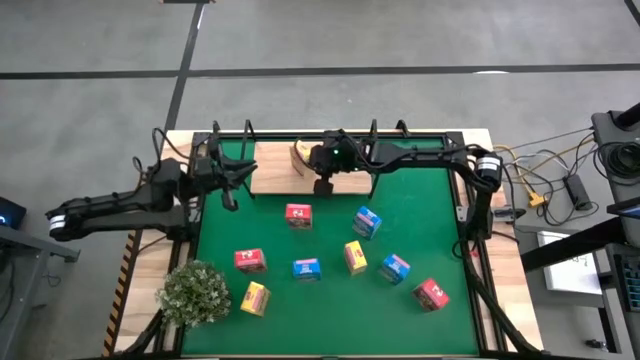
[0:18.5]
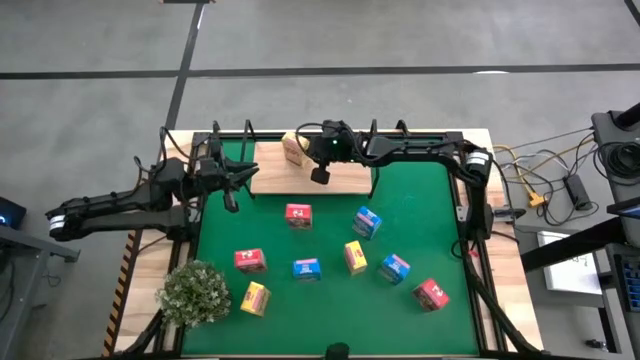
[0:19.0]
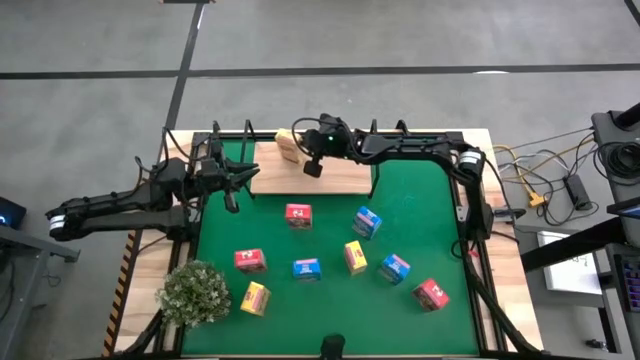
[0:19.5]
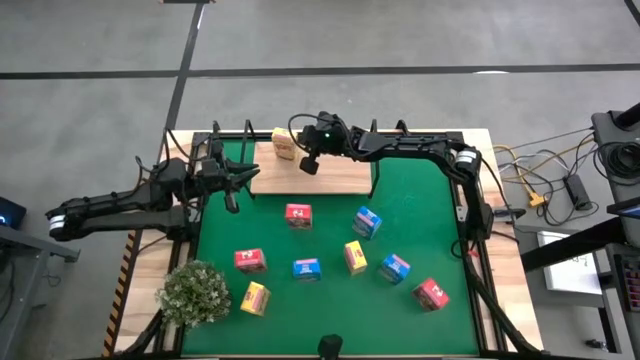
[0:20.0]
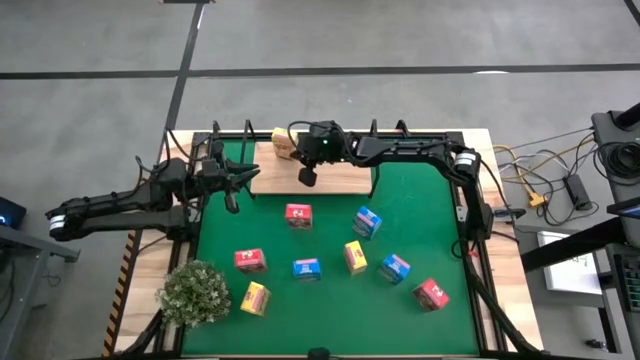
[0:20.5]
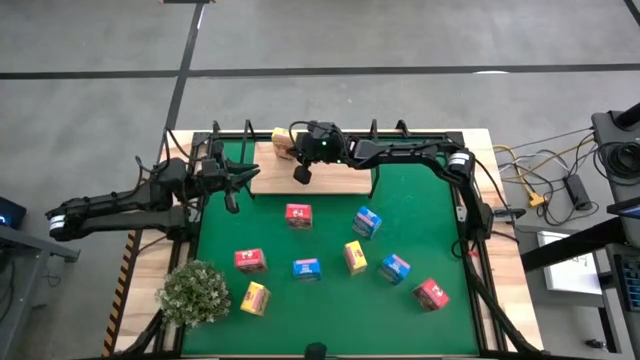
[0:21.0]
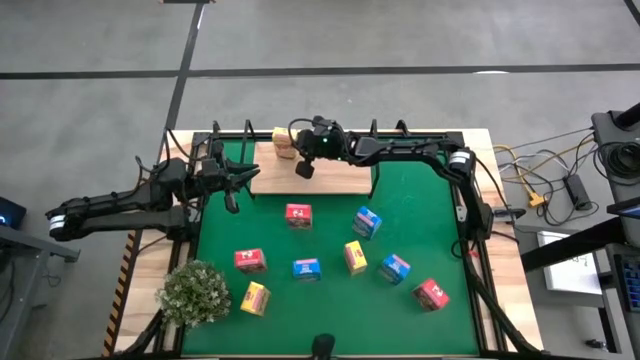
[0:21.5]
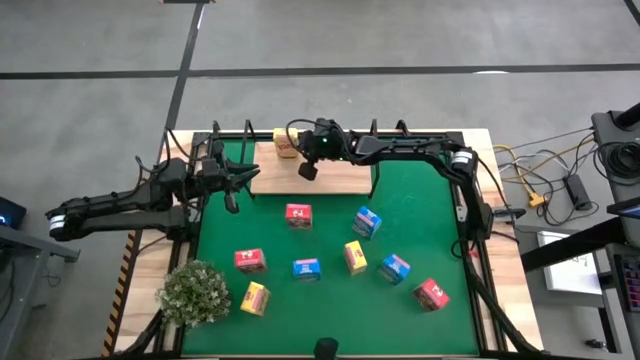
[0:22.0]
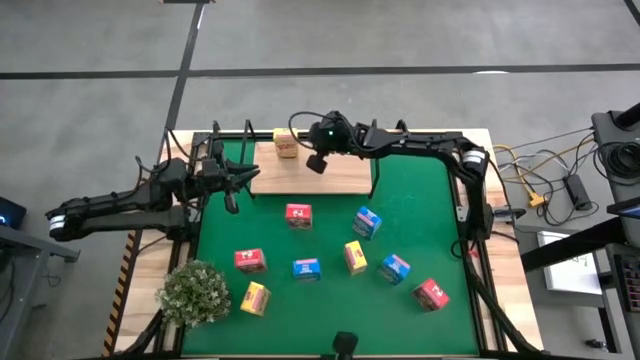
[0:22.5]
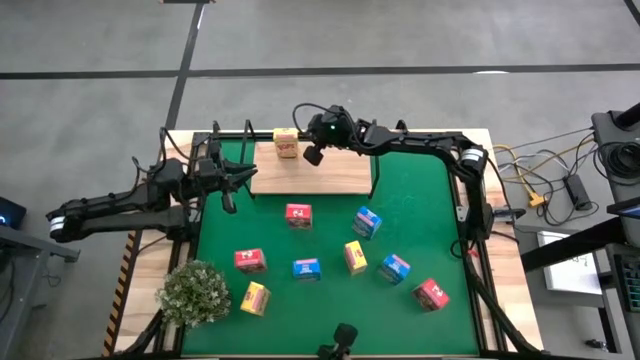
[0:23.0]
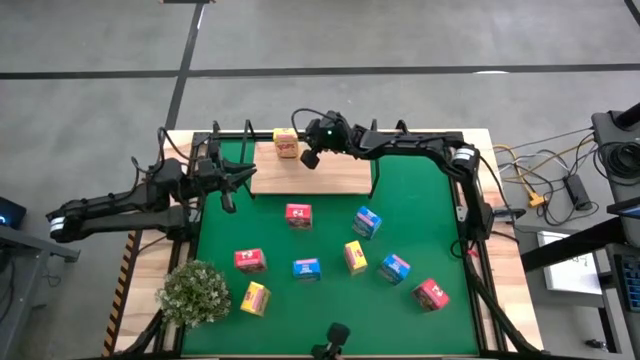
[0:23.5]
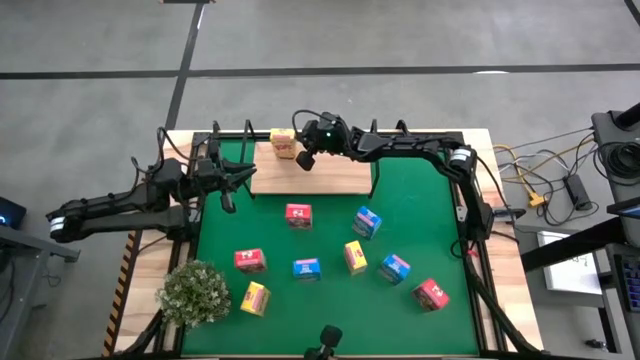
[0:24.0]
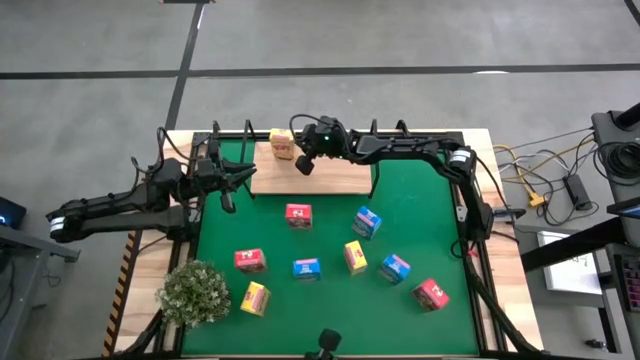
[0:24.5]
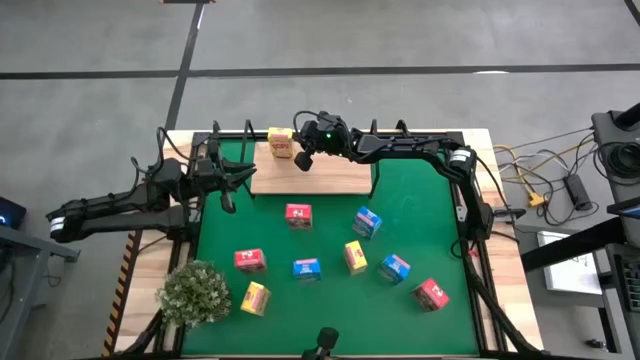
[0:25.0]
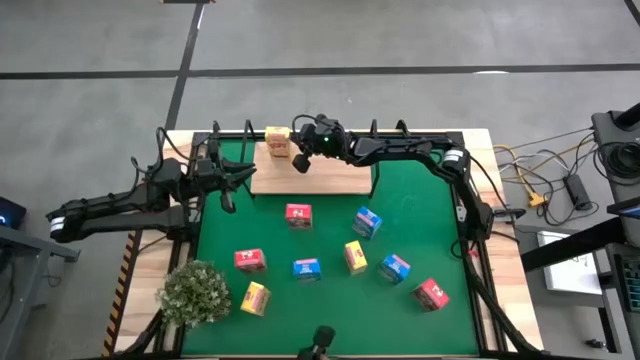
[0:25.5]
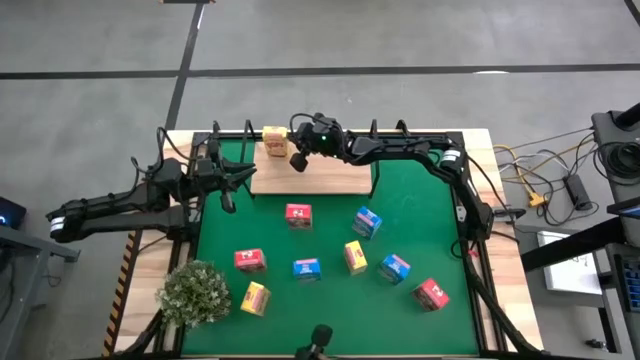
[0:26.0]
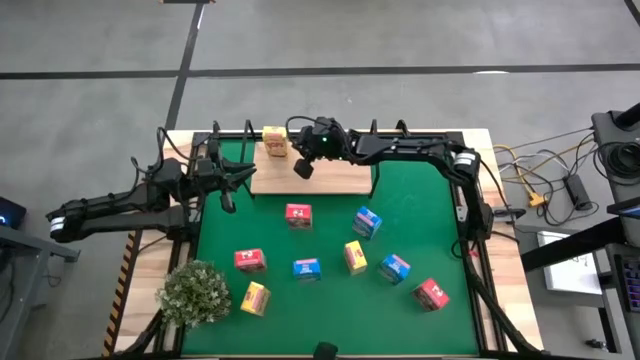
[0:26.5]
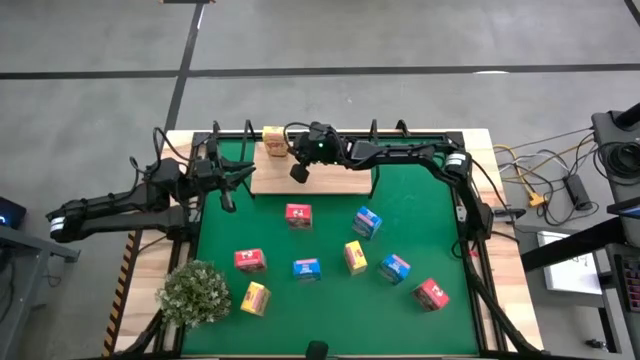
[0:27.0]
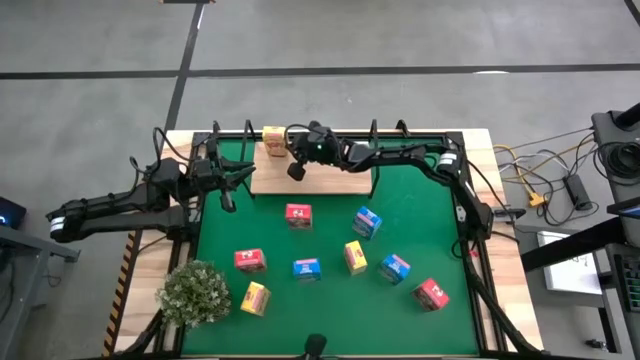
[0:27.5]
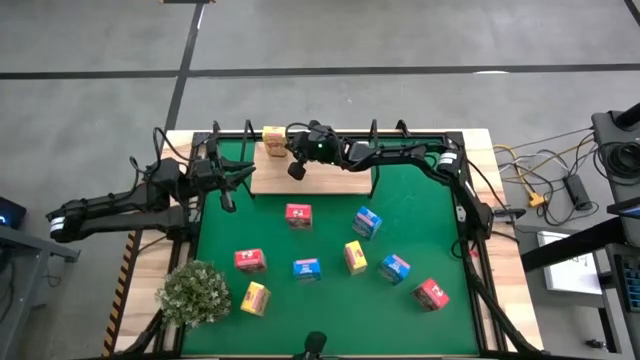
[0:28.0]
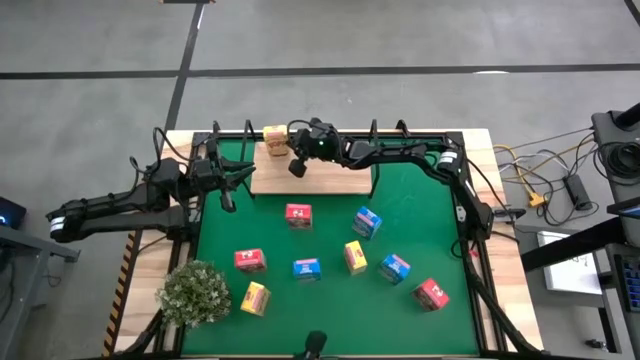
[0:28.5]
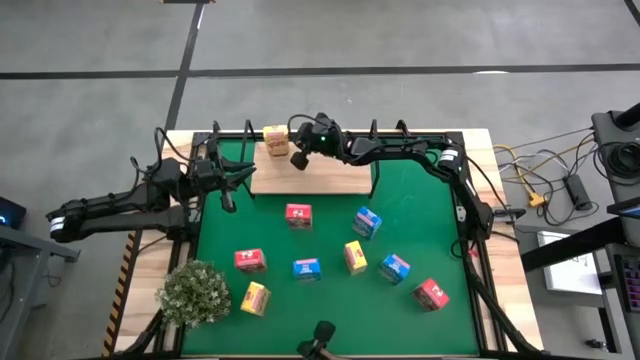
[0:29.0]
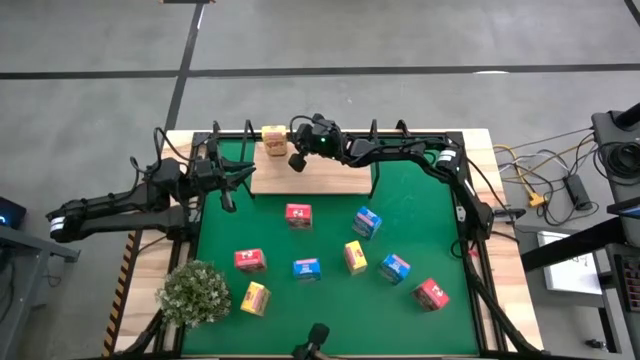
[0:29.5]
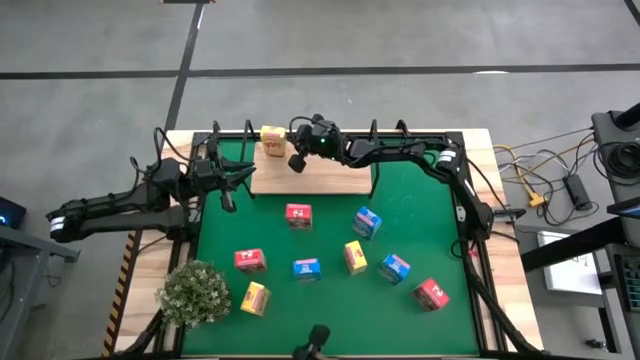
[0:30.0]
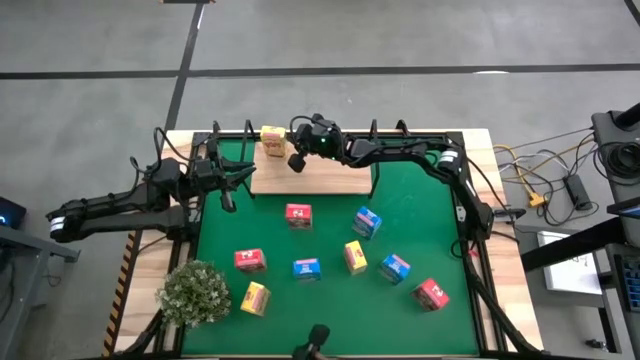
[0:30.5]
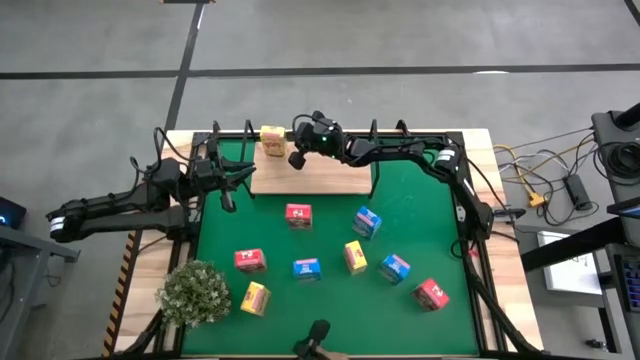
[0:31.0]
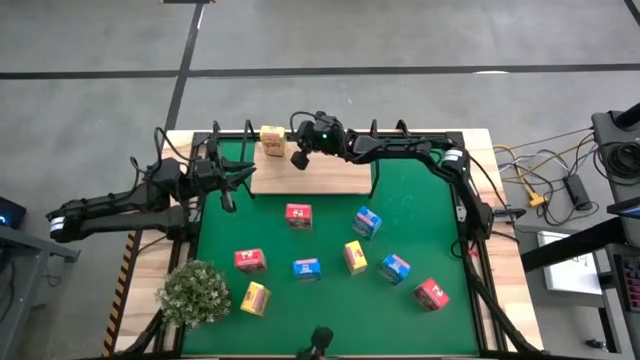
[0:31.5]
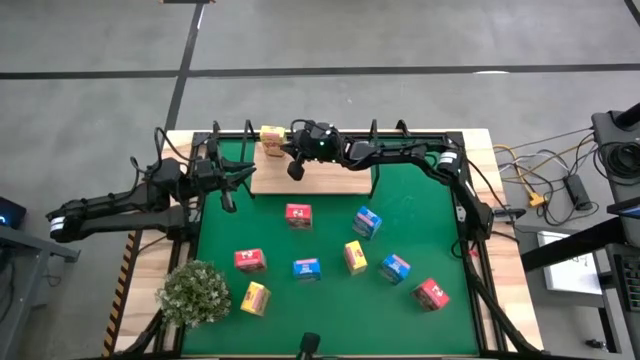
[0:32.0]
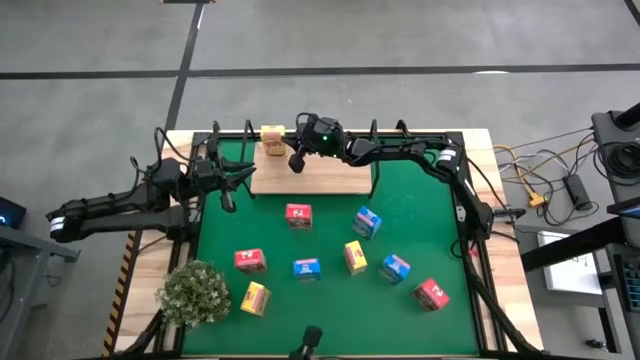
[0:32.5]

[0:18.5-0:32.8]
Task: Stack cereal on shelf
Put the top yellow cereal box on the shelf

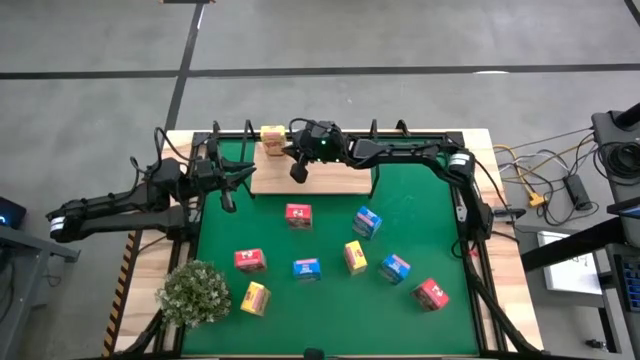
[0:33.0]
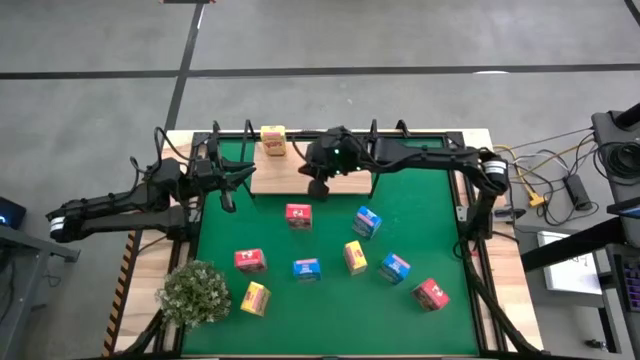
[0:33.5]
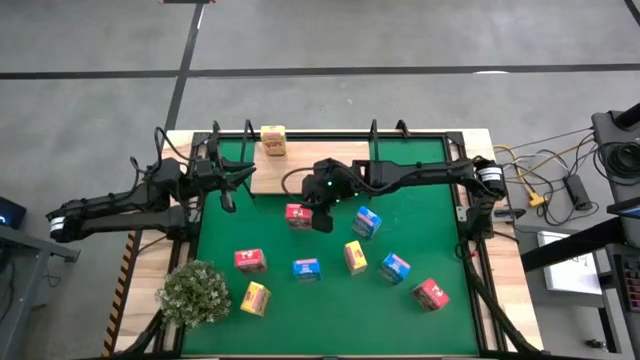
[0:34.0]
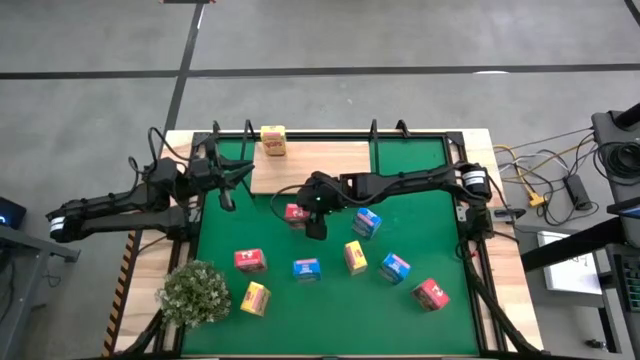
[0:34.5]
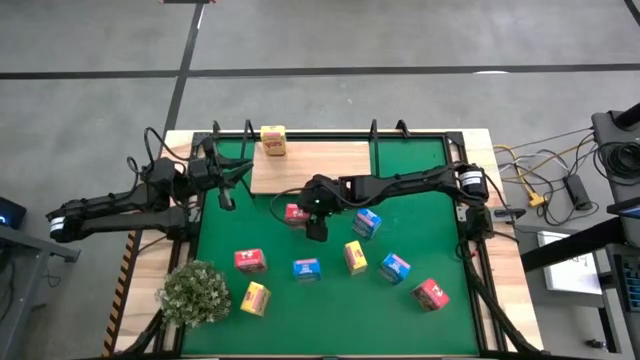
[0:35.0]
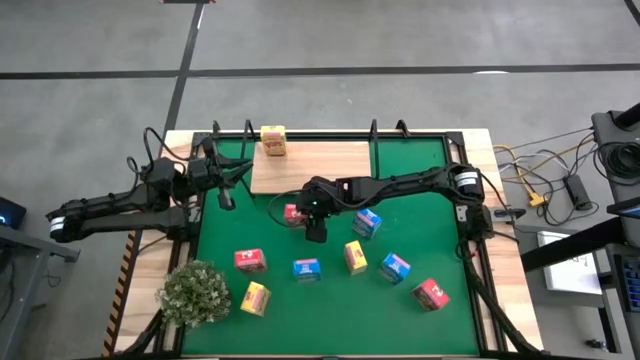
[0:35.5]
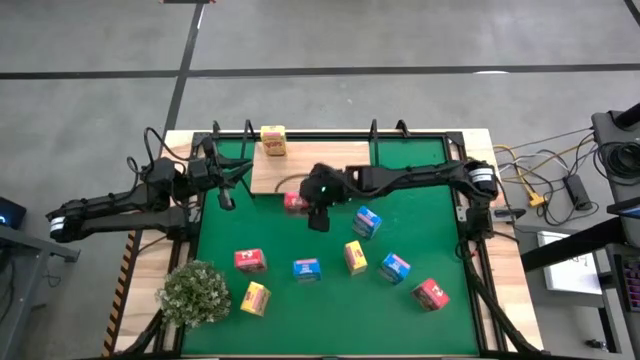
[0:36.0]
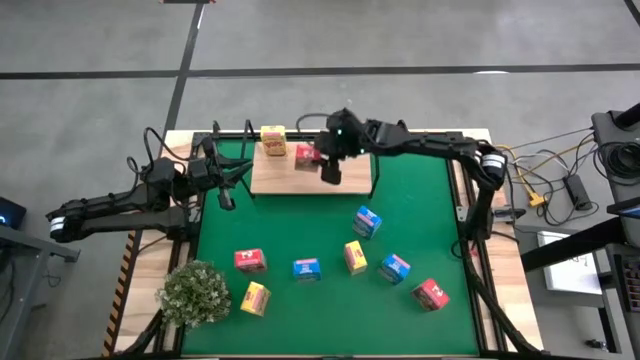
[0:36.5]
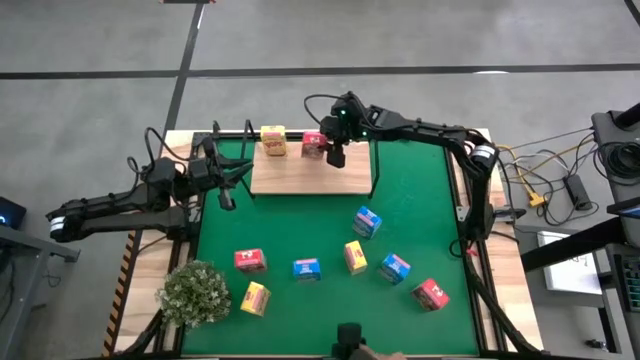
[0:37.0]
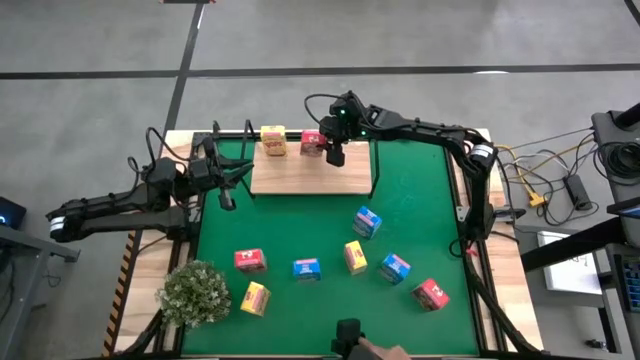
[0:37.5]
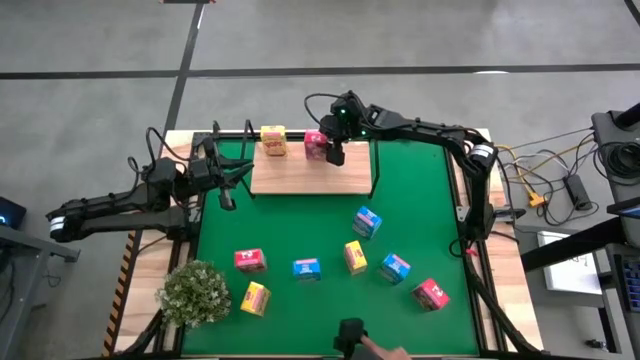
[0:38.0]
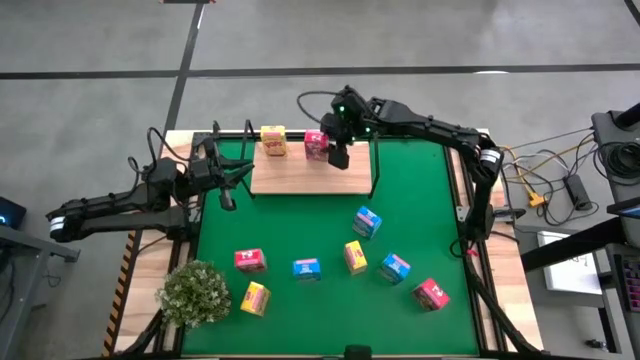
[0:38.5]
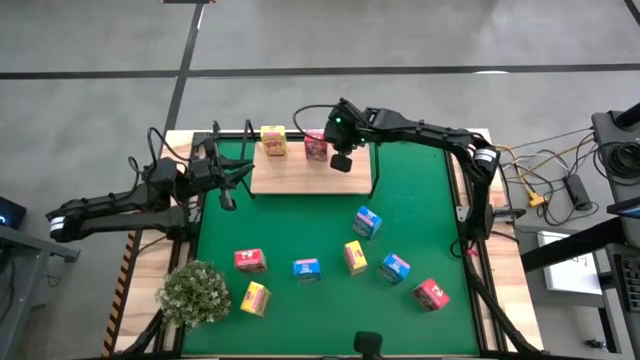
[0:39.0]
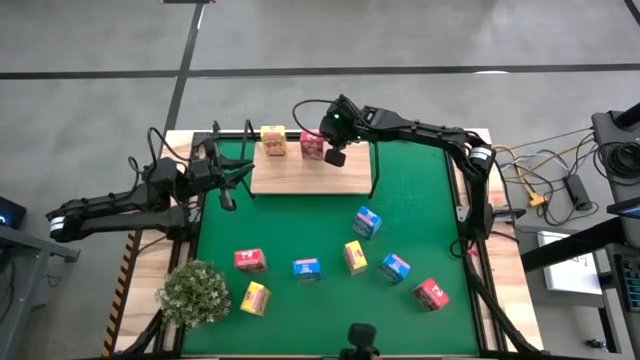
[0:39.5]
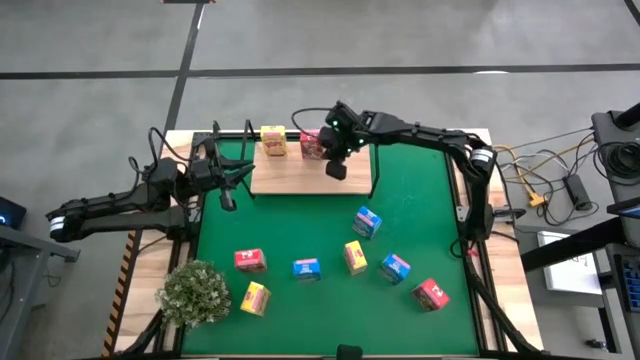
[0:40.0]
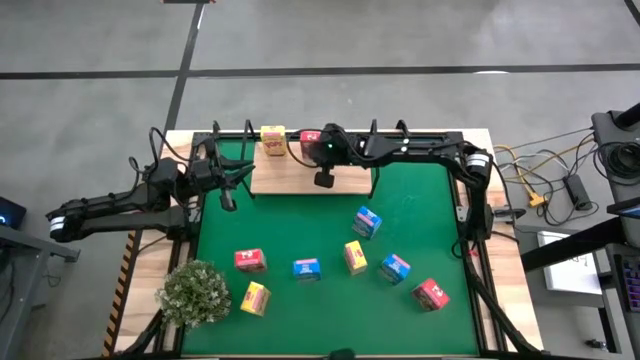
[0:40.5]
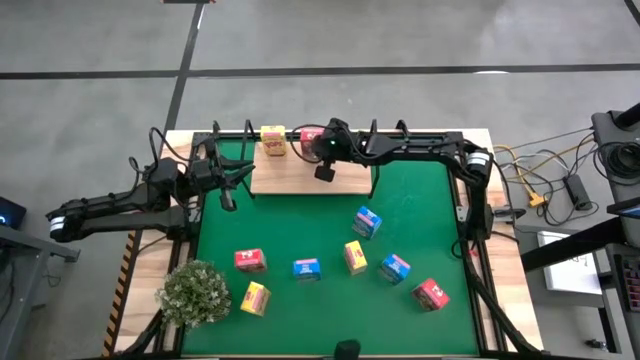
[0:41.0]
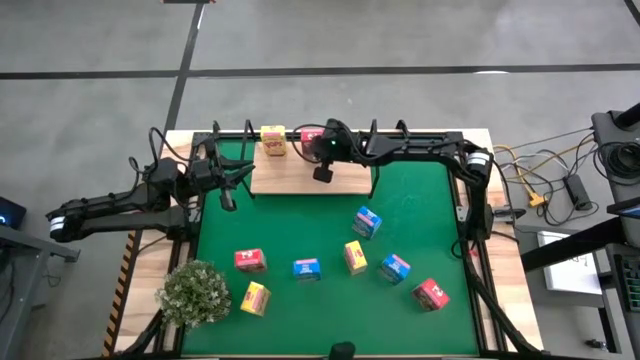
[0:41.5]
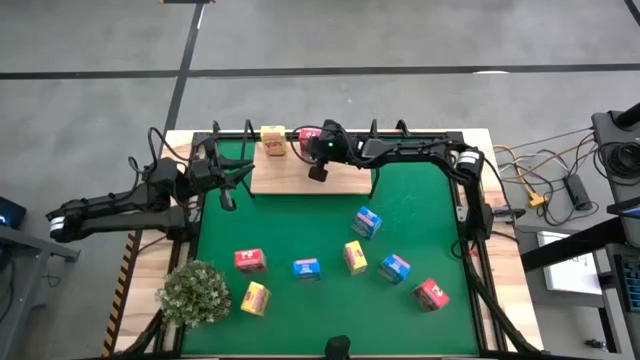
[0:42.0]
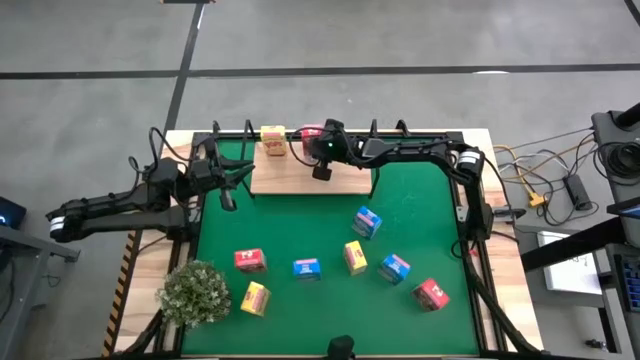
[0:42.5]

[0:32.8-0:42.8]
Put the top red cereal box on the shelf
